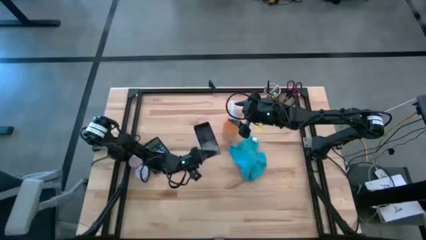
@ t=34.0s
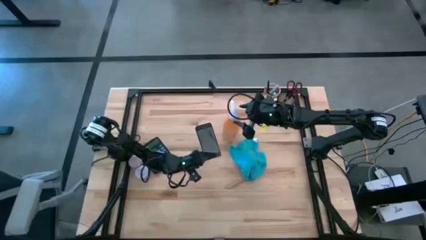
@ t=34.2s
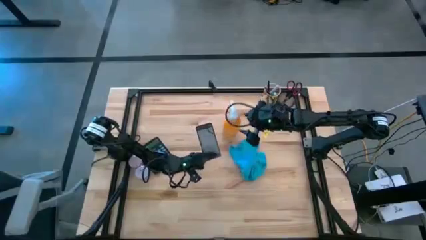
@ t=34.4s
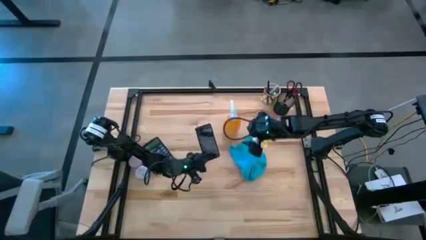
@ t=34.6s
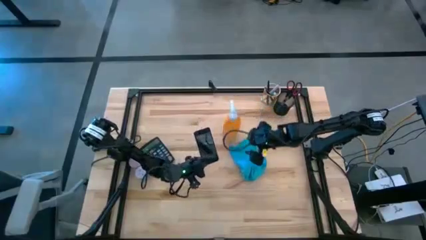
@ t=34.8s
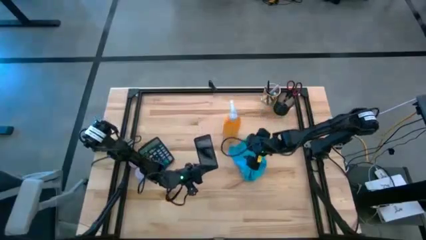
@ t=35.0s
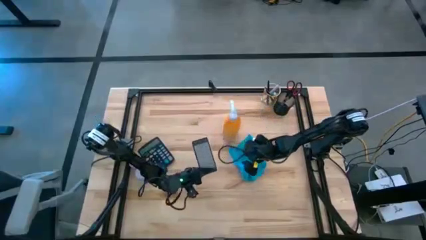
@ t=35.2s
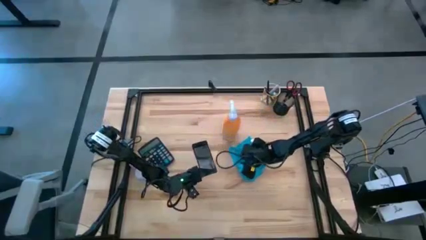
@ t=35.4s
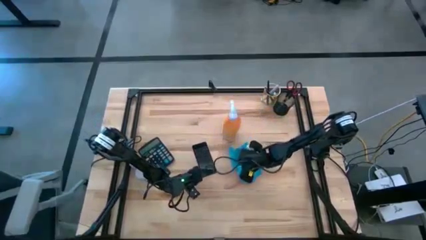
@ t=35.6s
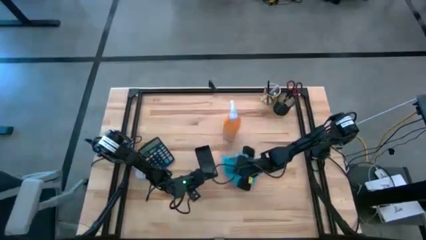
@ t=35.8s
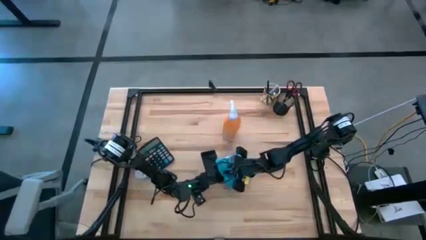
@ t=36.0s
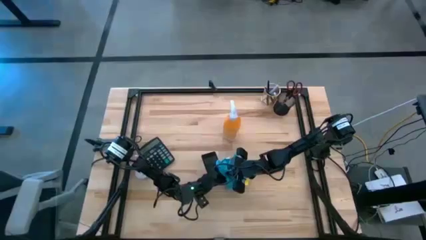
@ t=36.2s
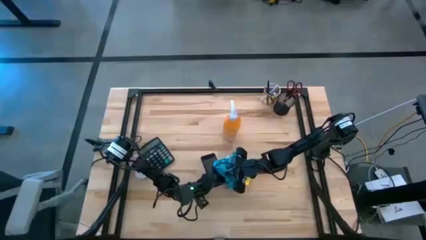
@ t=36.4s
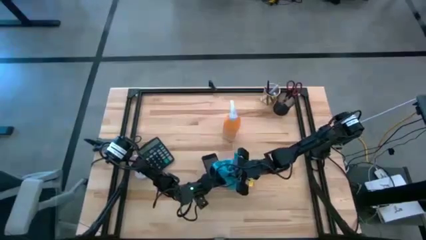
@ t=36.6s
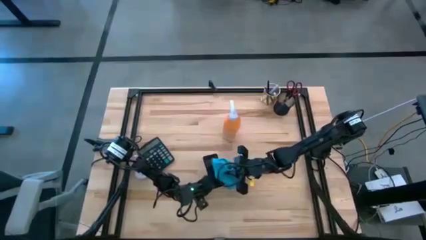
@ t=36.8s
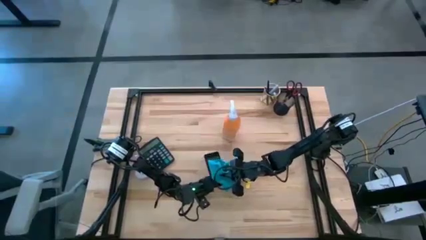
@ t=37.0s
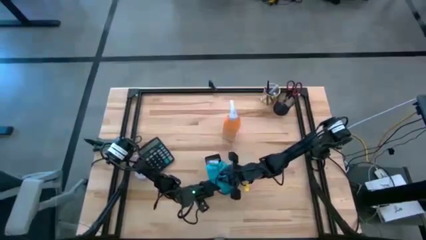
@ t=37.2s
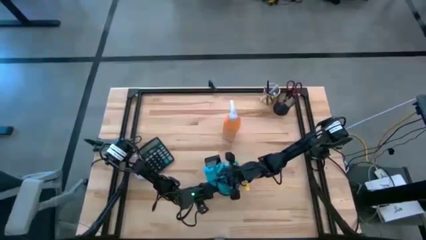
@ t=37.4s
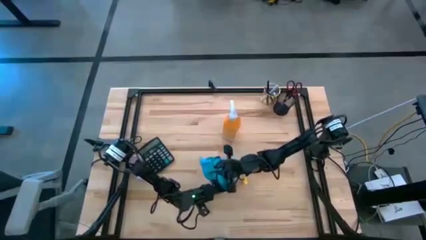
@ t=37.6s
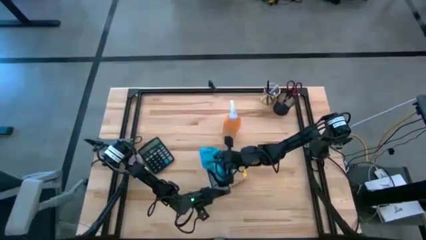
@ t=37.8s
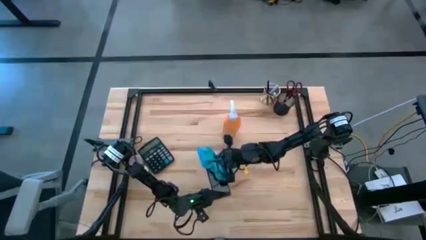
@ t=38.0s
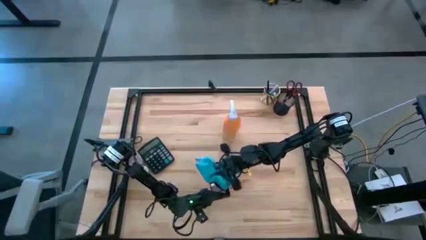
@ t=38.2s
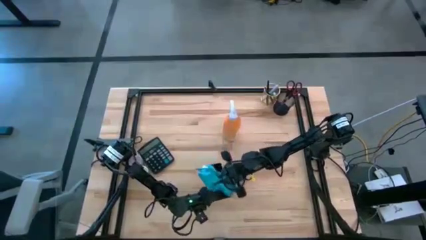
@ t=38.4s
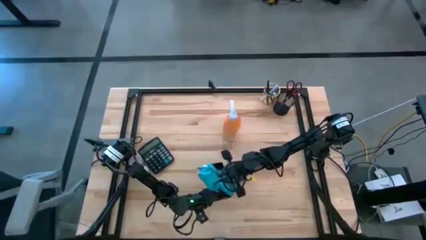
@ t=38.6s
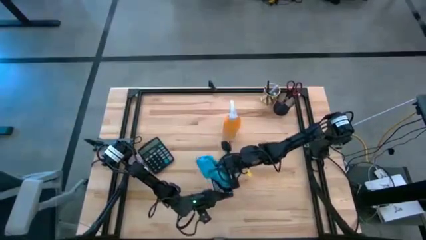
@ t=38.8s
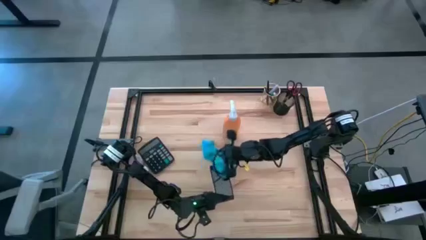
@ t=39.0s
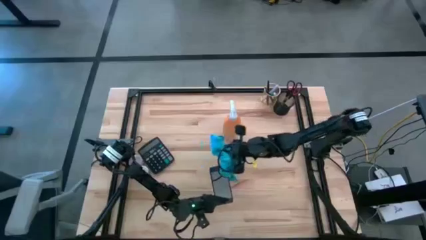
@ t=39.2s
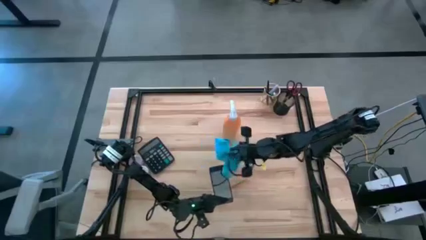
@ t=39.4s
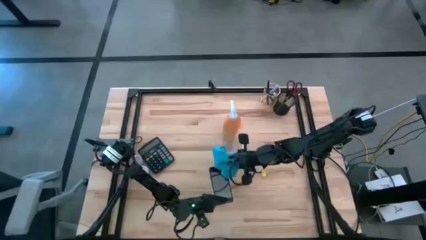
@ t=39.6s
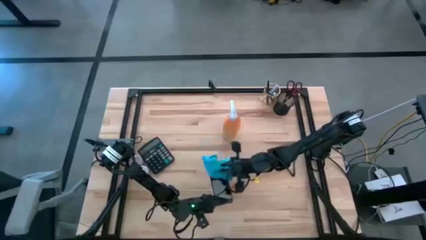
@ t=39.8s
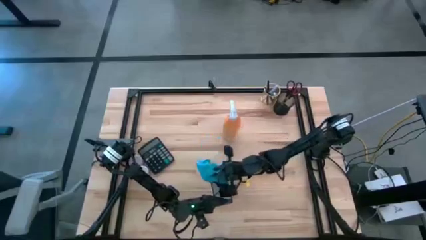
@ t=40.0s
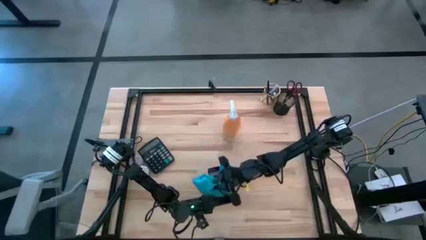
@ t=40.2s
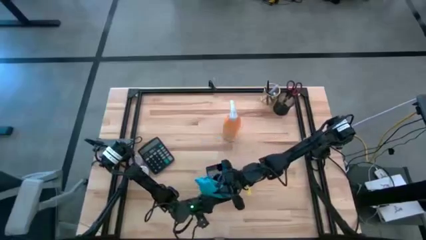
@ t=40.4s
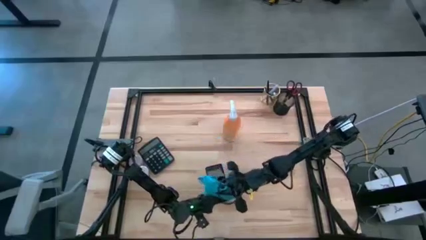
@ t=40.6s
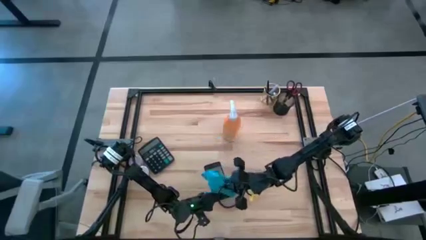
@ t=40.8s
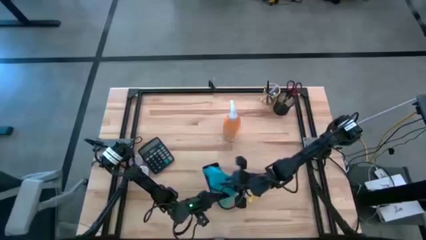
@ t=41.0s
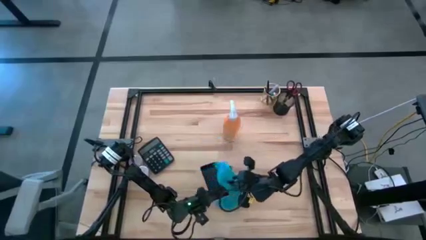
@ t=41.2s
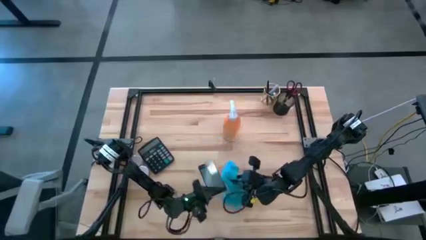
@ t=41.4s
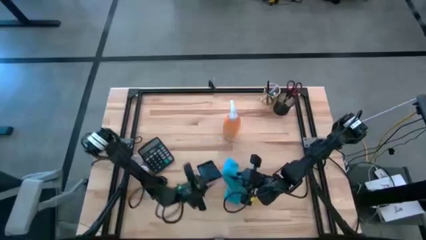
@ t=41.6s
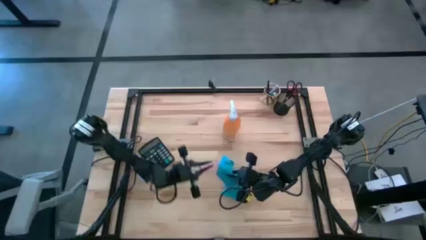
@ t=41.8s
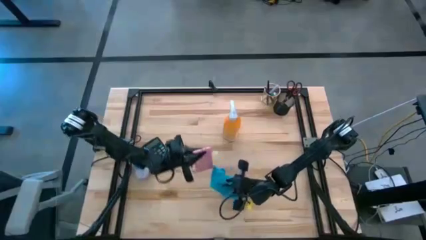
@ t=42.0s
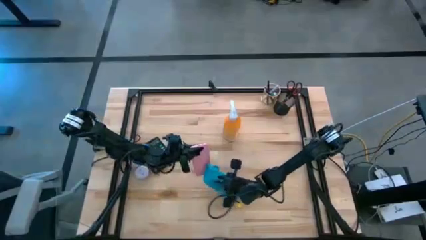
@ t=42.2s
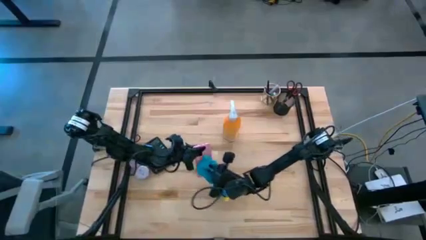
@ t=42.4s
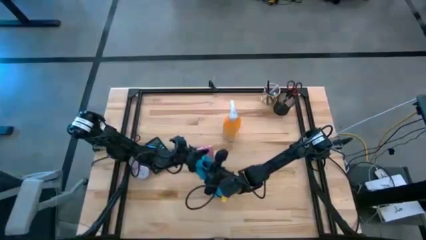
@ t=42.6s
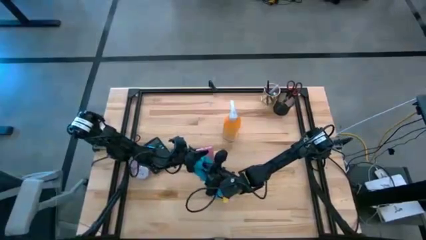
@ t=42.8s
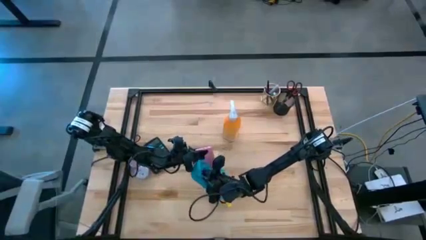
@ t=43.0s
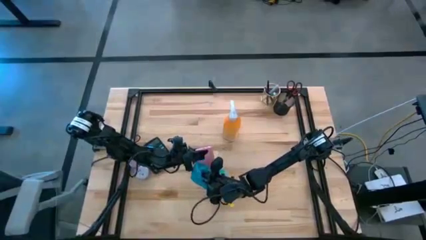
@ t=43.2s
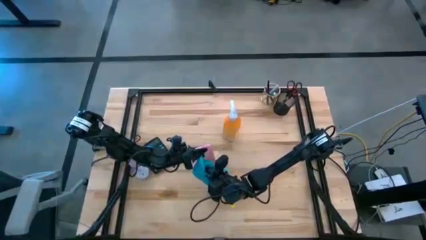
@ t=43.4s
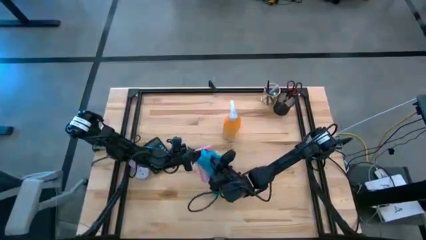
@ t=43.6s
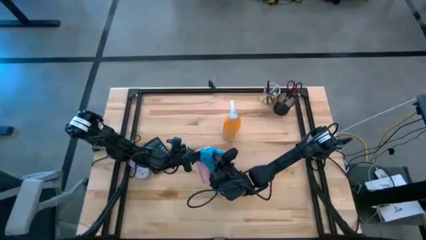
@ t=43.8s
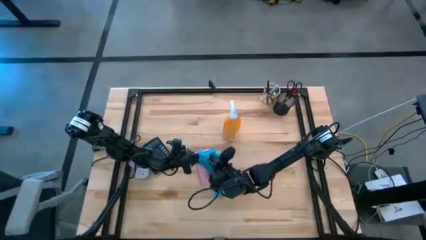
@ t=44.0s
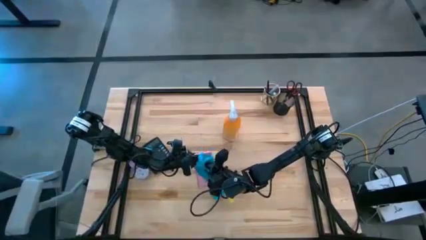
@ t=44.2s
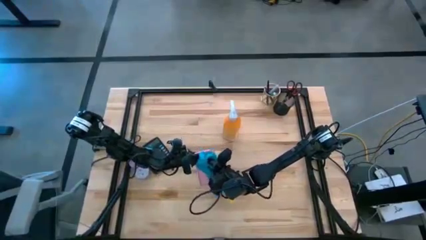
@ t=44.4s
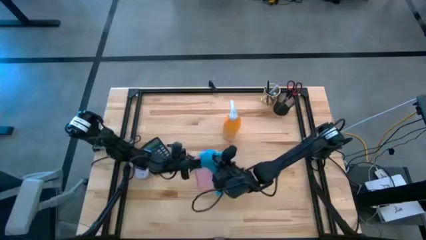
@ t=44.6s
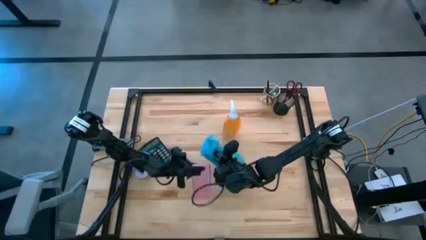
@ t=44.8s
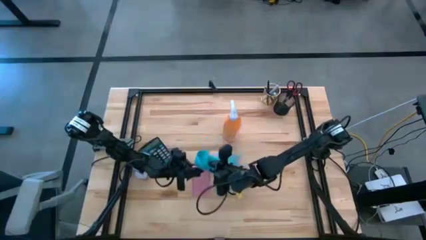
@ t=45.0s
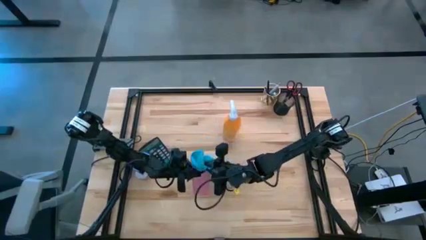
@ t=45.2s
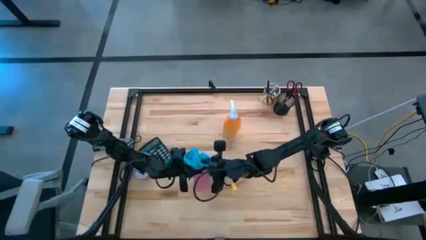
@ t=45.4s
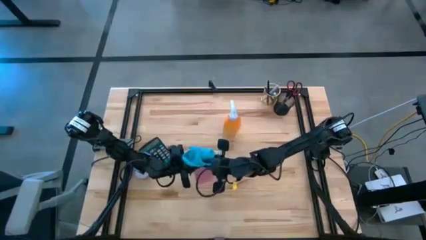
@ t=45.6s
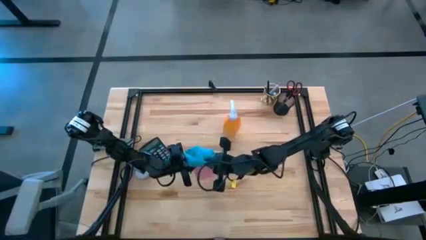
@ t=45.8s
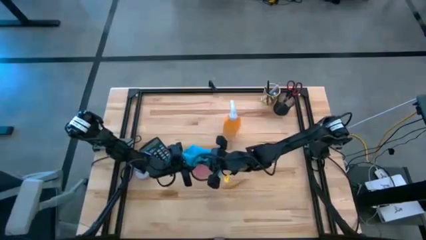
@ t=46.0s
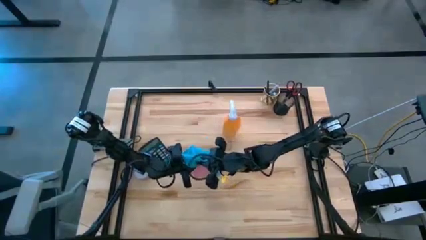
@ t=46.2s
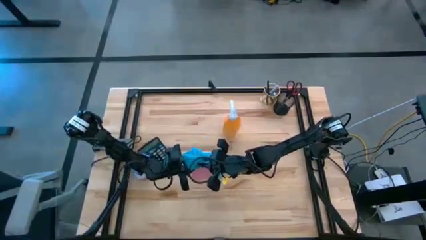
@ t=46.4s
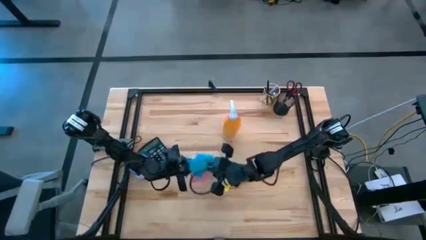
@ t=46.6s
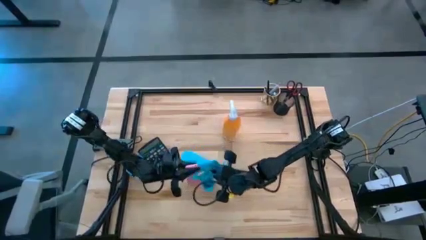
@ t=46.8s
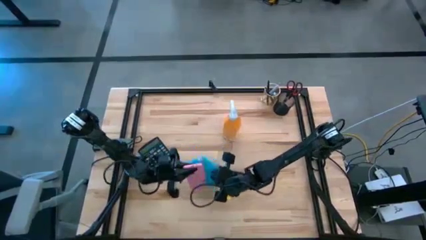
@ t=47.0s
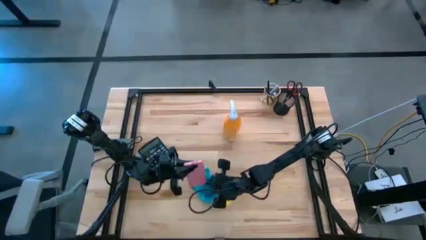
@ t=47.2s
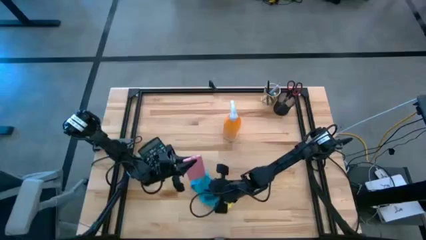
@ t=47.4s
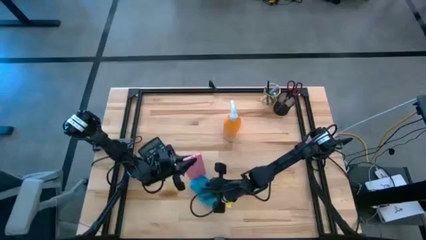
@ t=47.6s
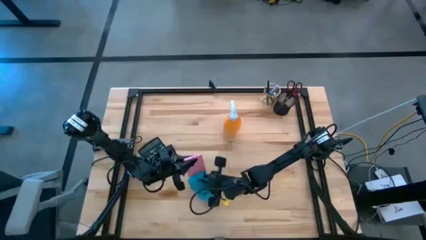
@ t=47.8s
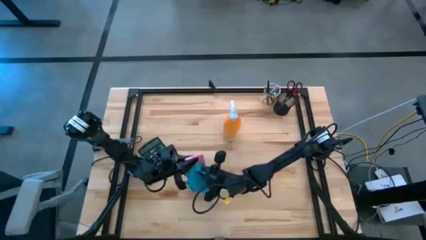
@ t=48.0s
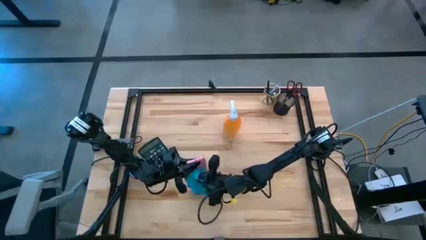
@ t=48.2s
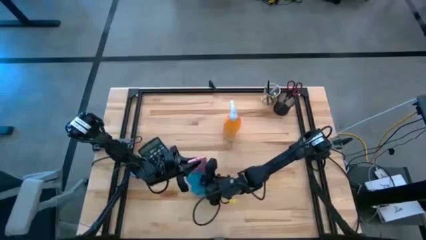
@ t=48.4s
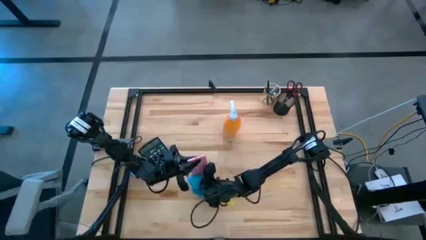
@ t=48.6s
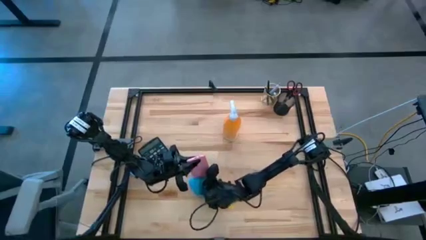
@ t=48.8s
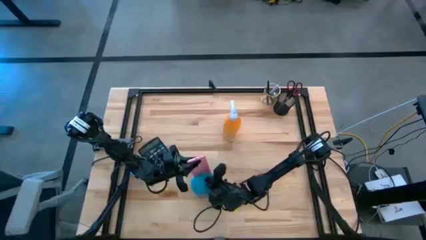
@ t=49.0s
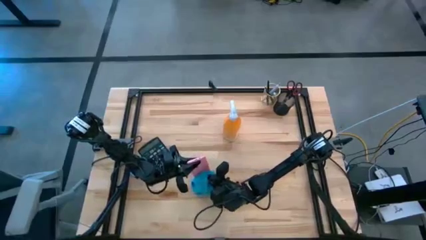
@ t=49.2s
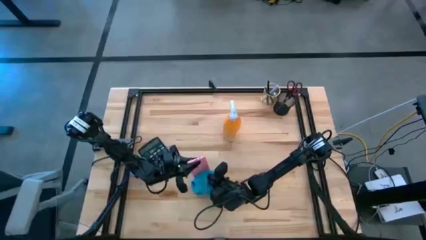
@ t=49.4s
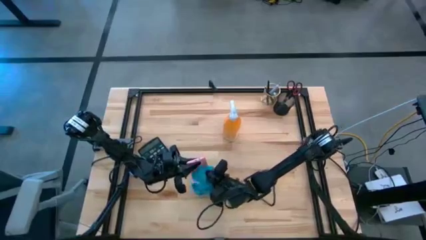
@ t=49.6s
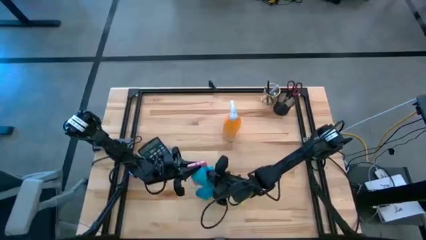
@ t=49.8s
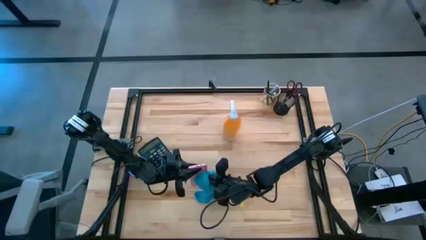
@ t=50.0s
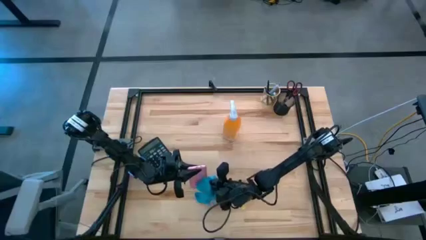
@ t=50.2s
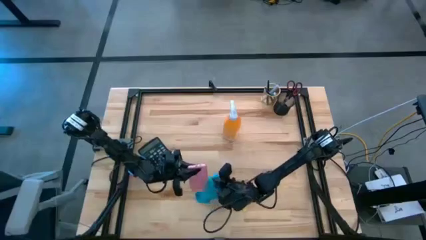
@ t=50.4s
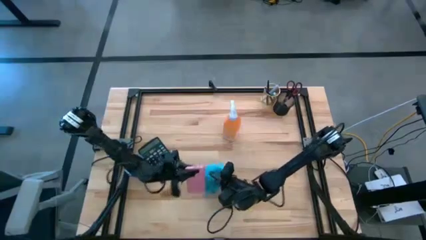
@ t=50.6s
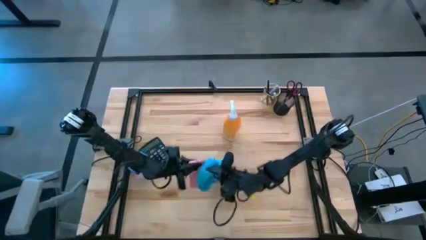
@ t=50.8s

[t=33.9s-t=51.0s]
Task: Apply microfiber cloth
Wipe the pink cellphone with the blue microfiber cloth
